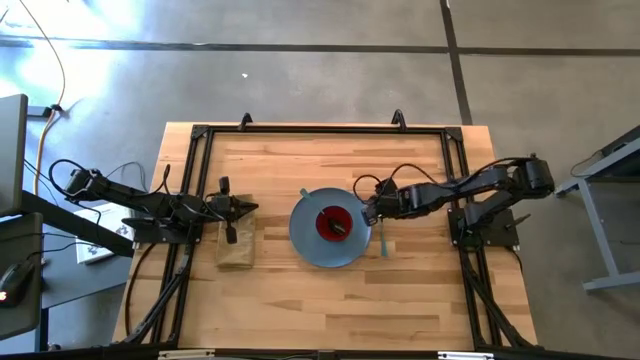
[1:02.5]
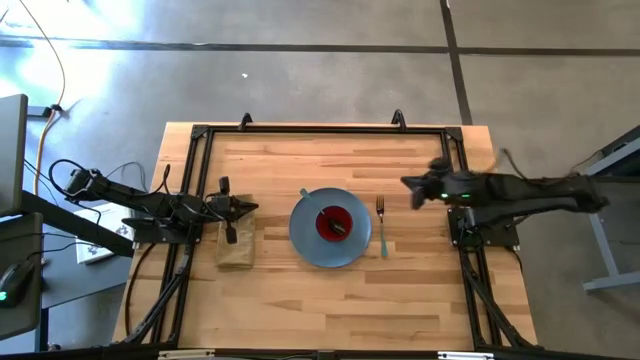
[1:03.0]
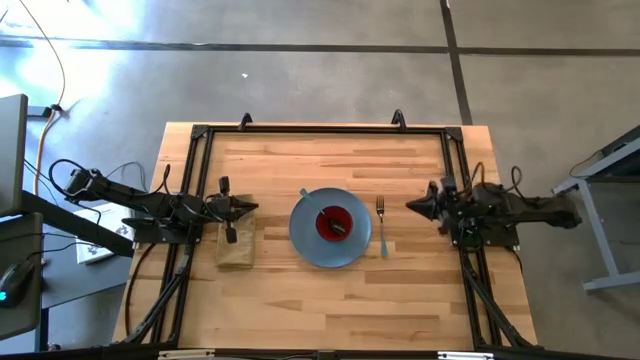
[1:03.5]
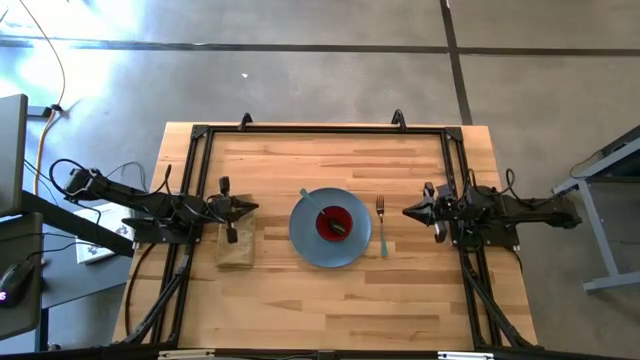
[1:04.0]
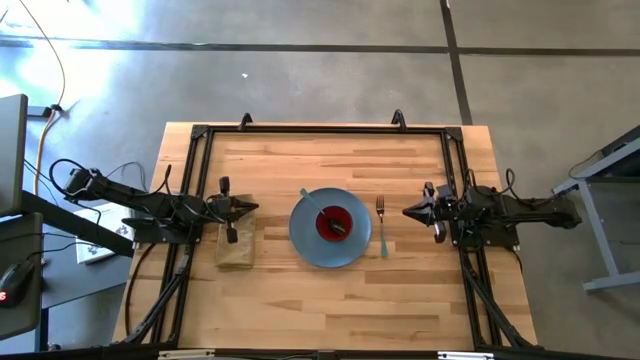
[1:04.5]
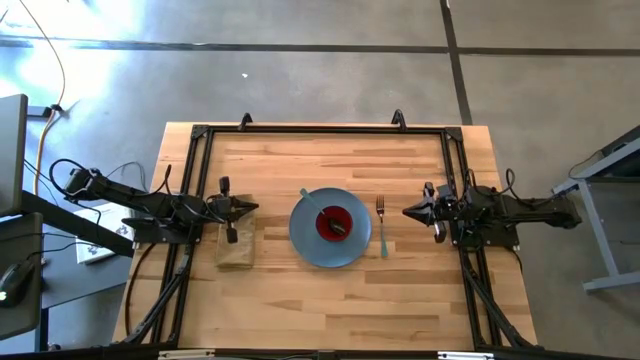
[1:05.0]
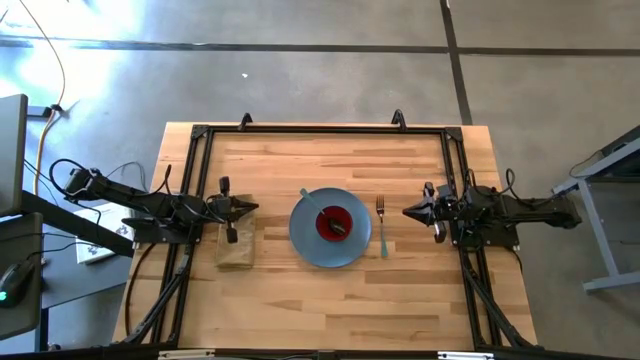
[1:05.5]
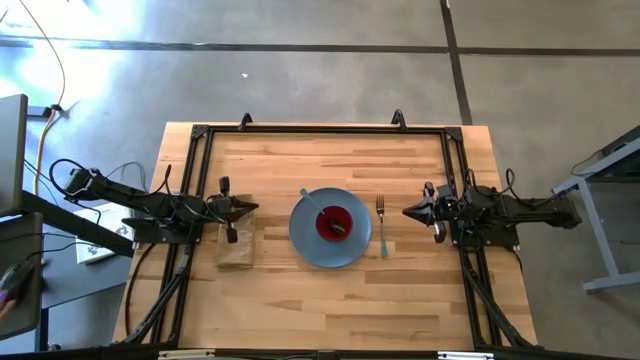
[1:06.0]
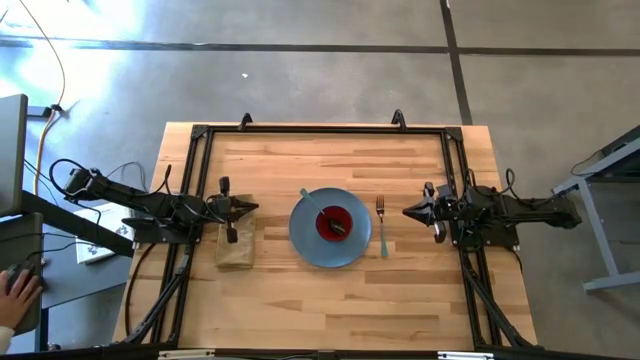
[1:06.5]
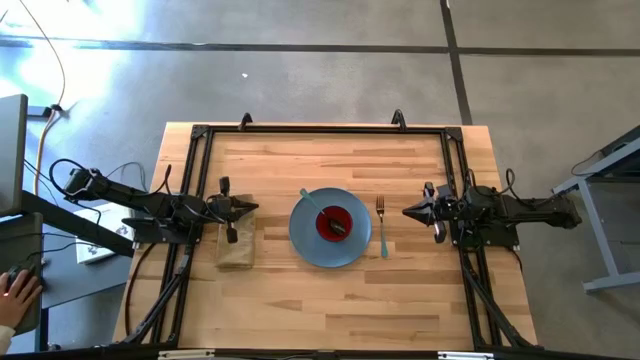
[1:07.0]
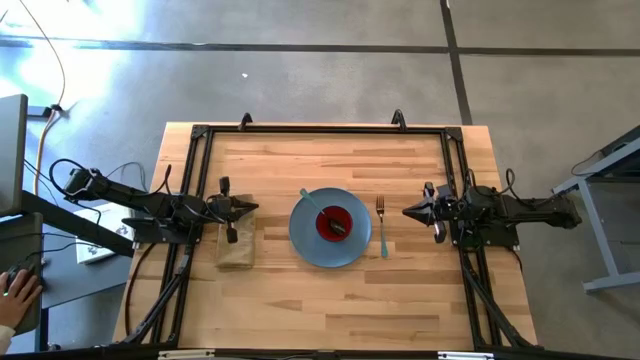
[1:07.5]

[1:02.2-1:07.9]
Task: Set table place
Return to Home Position

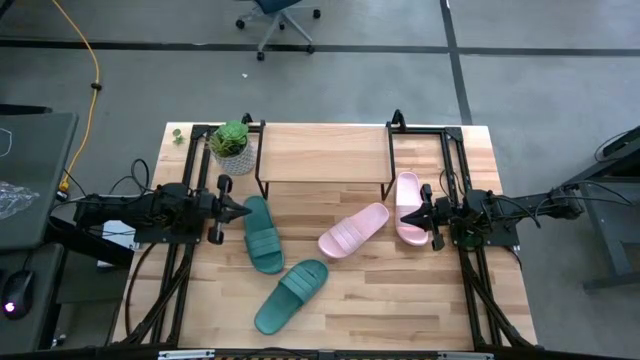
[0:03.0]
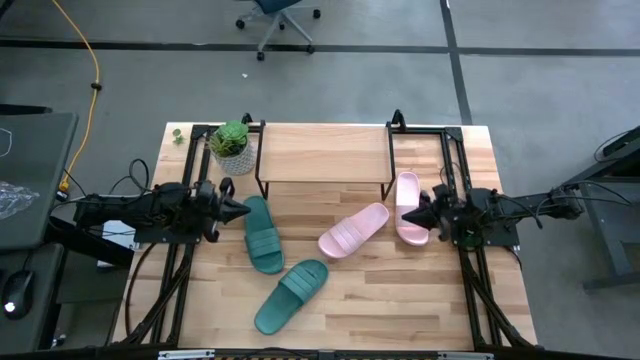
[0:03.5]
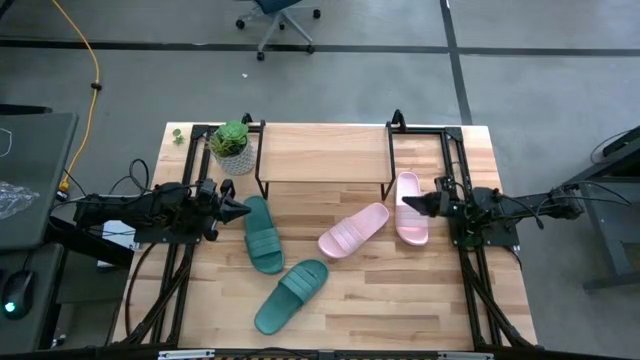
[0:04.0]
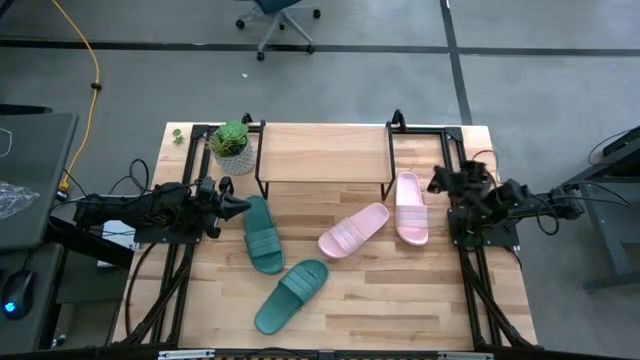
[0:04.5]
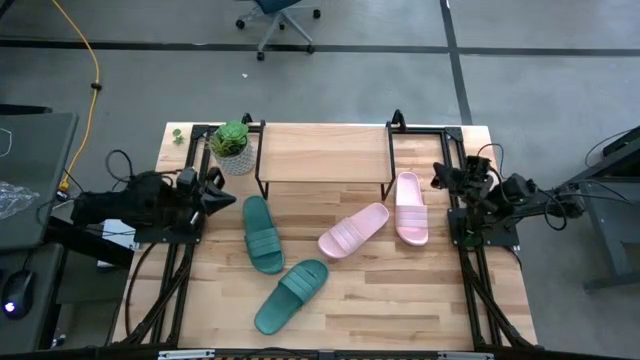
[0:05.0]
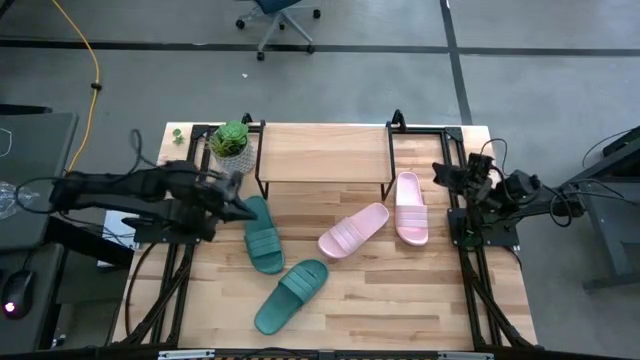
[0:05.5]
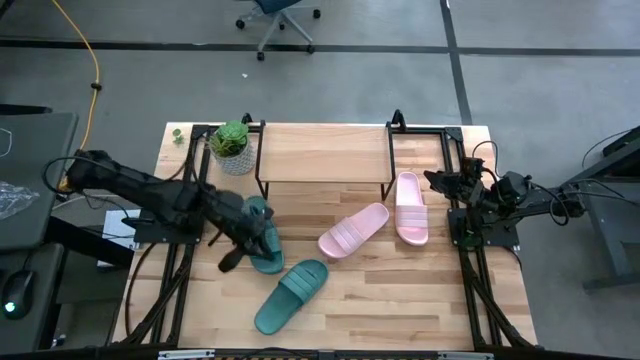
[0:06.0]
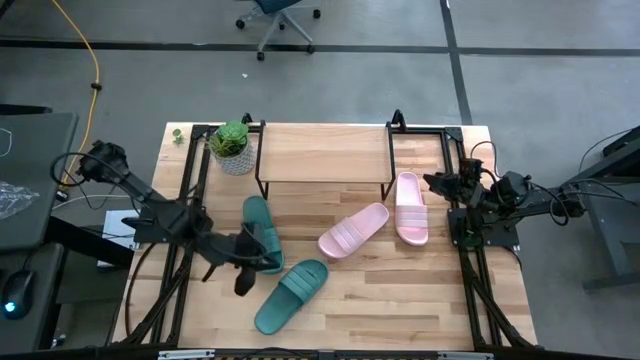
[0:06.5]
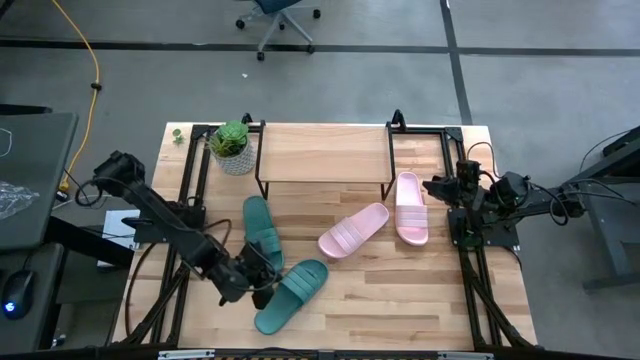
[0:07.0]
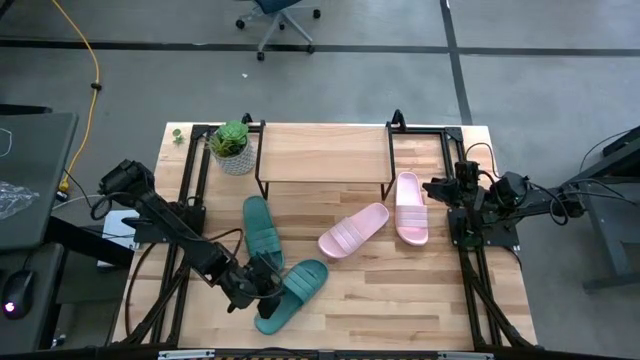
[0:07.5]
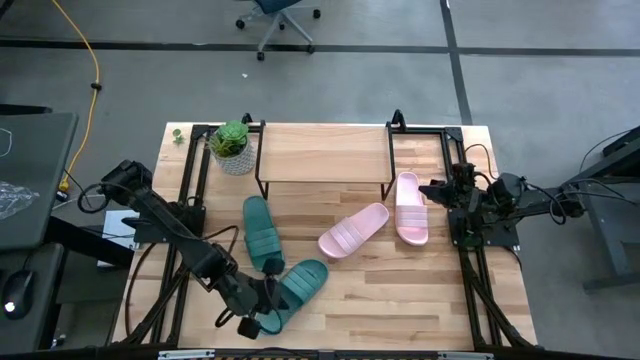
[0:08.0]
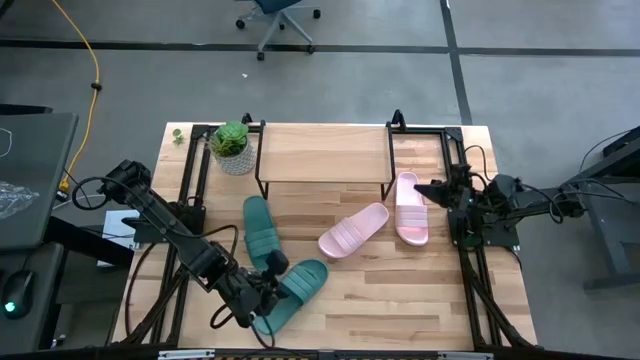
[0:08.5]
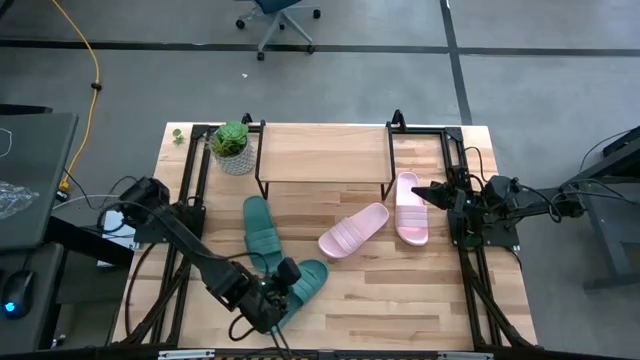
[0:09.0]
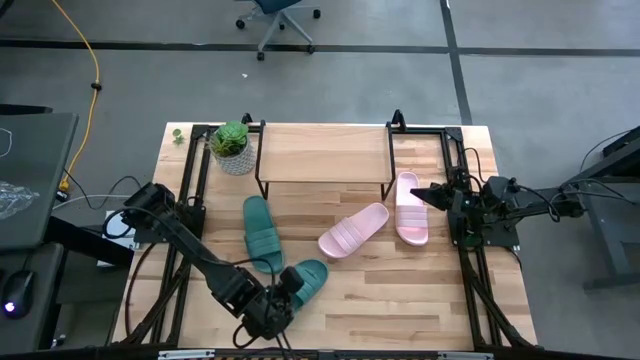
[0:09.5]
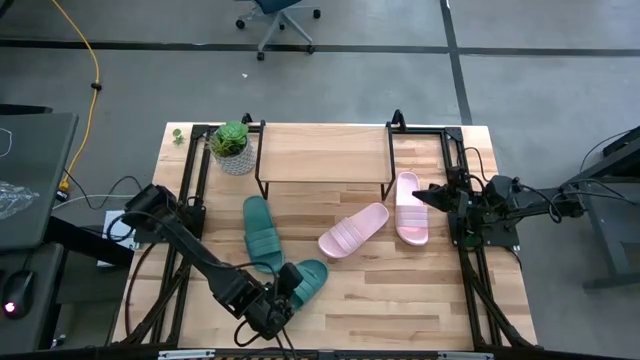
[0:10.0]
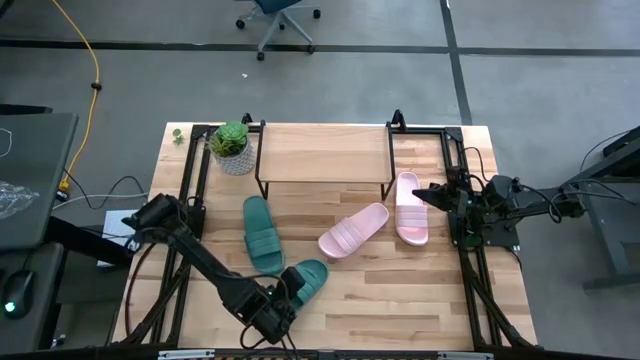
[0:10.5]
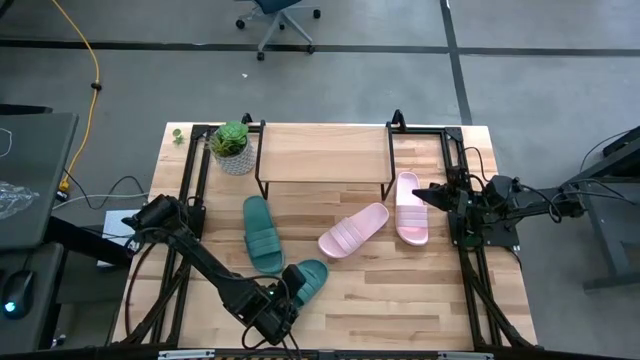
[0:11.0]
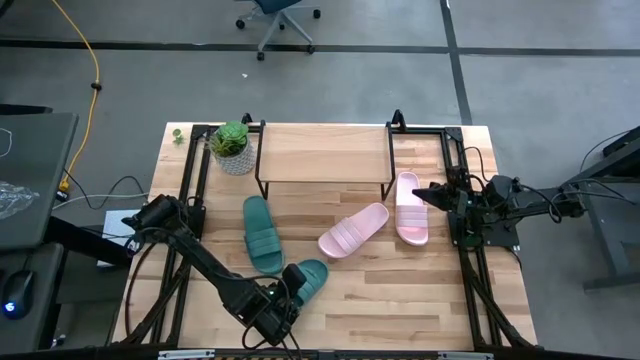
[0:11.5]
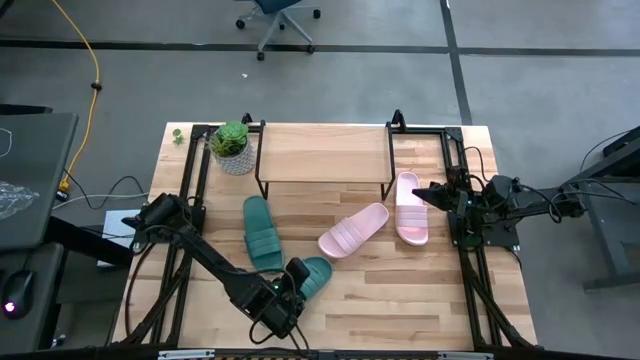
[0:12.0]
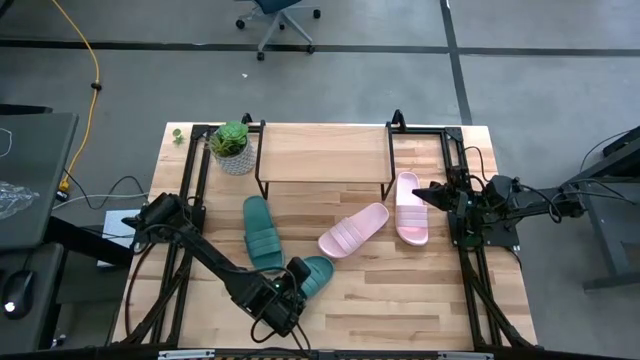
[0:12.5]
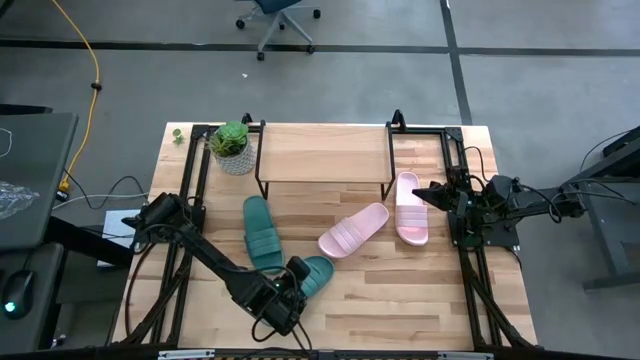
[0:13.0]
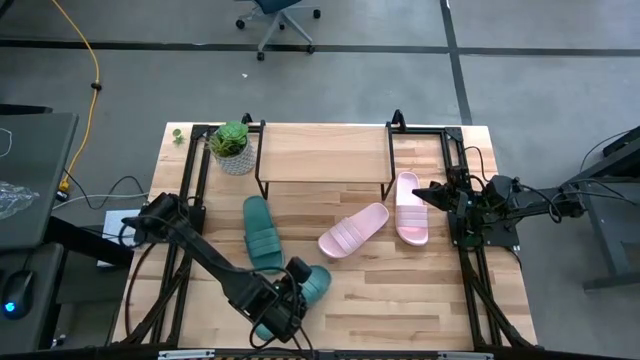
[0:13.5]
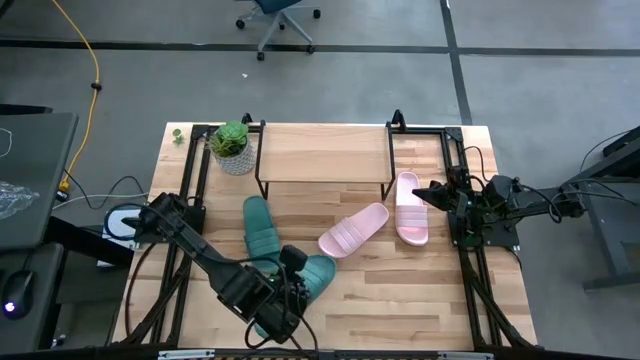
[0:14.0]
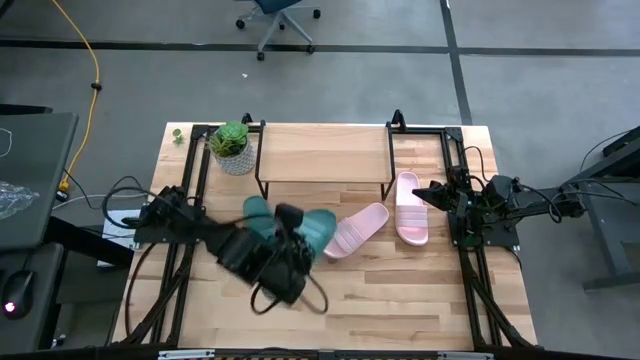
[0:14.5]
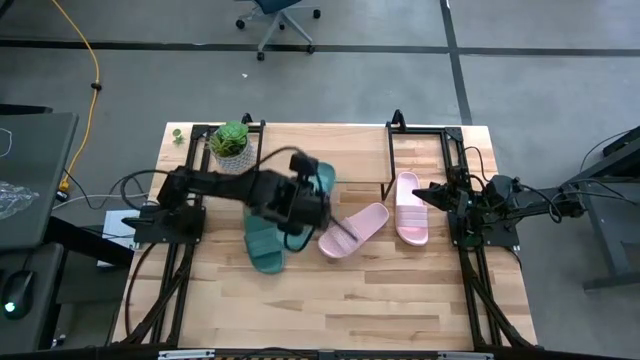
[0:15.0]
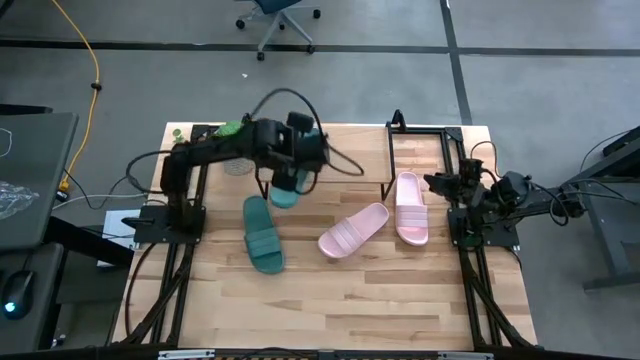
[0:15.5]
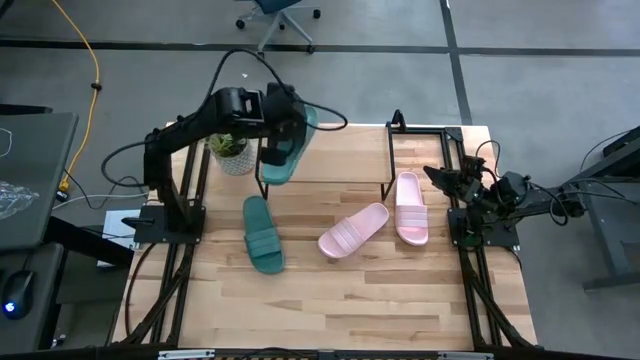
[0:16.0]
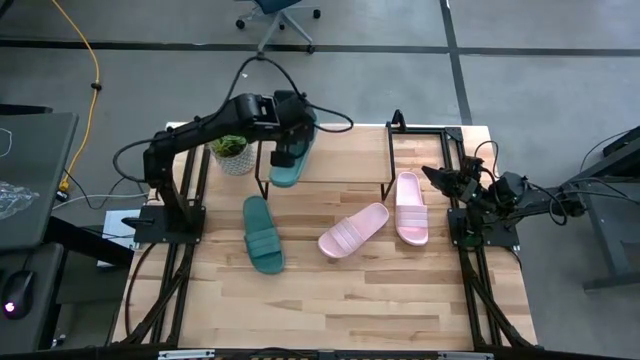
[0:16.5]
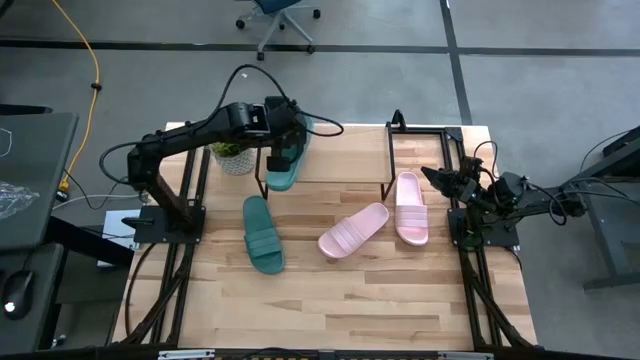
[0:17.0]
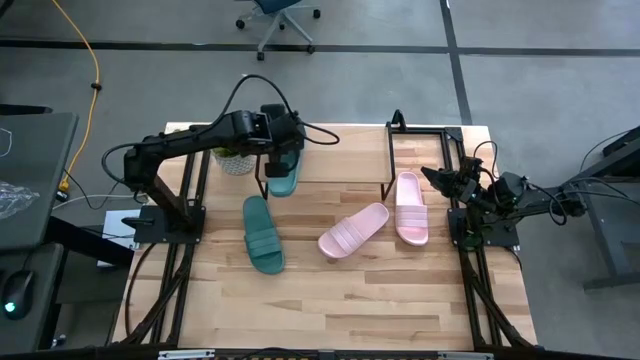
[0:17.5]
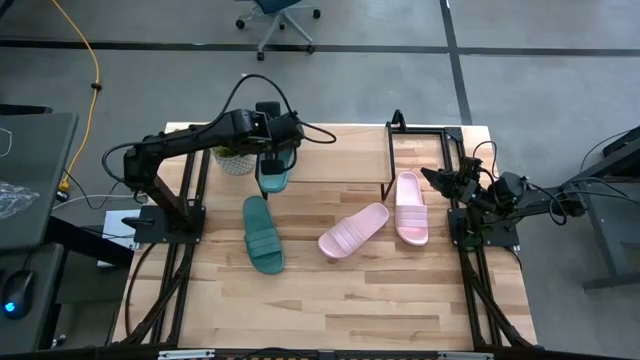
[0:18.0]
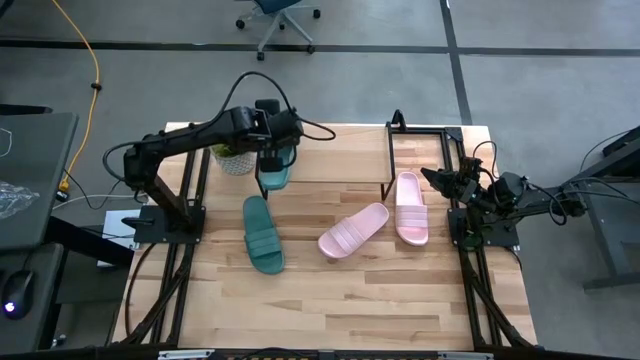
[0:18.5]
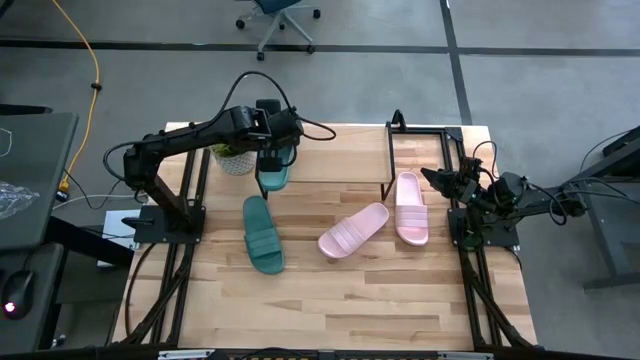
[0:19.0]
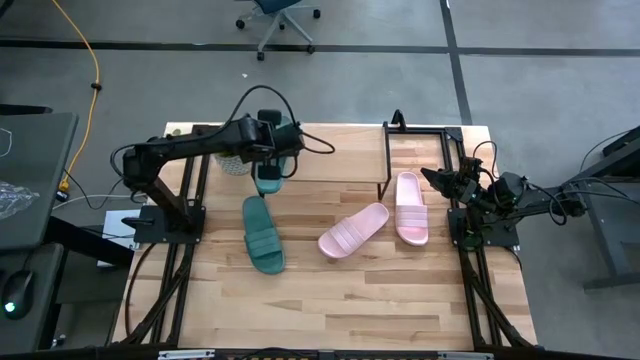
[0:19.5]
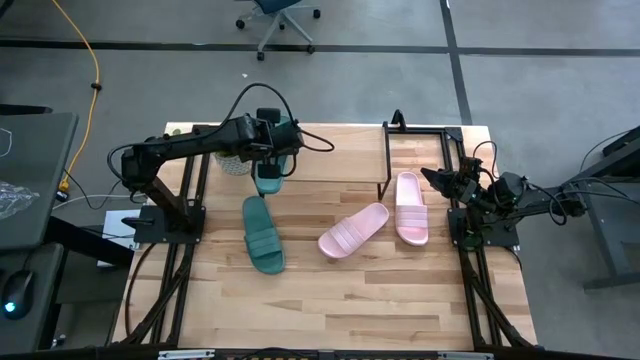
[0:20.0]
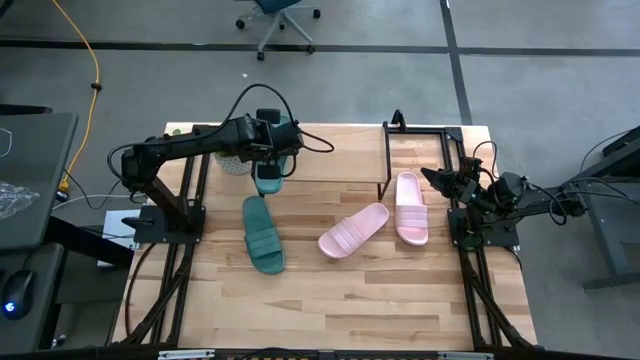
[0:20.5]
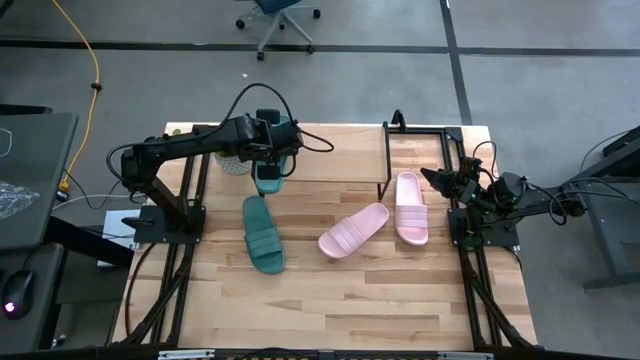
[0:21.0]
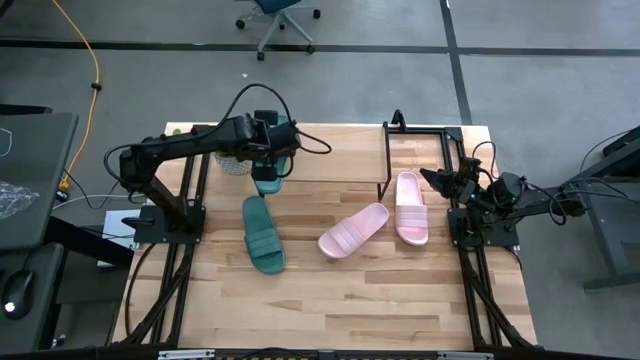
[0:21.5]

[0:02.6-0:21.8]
Task: Pick and place slides into the shelf
Put the bottom green slide on the shelf
